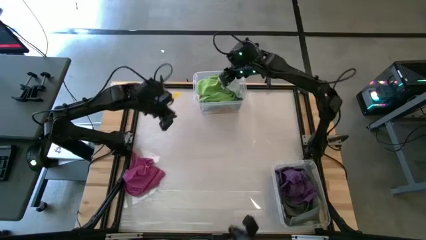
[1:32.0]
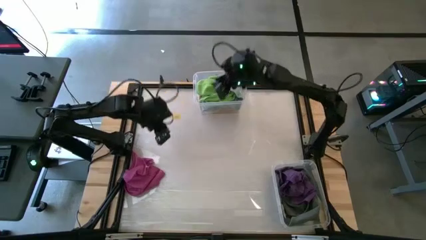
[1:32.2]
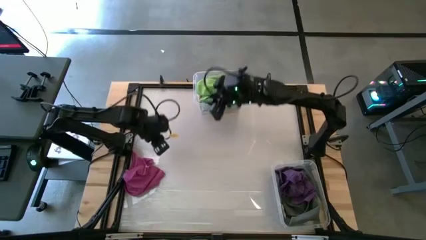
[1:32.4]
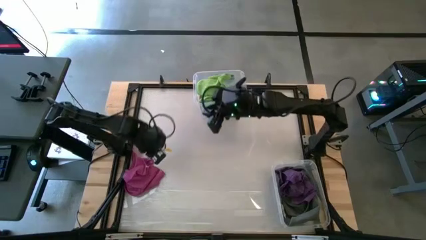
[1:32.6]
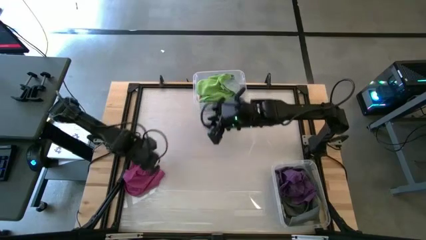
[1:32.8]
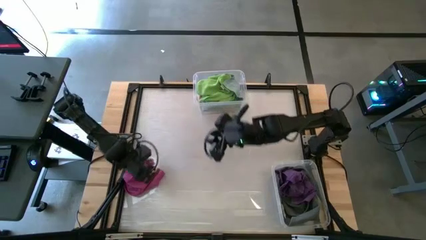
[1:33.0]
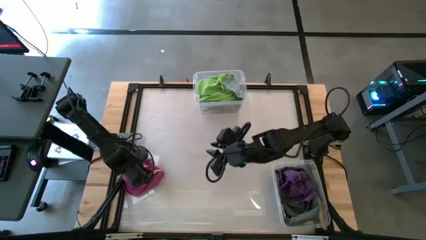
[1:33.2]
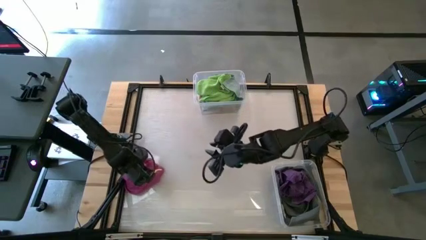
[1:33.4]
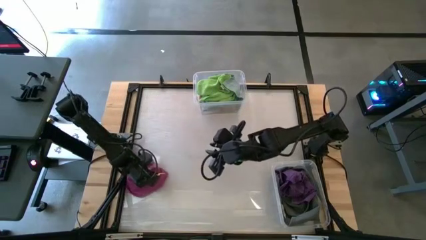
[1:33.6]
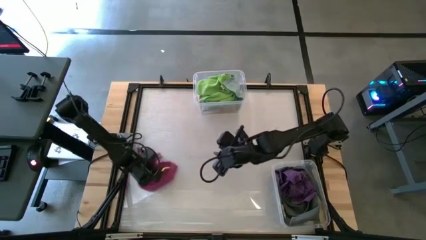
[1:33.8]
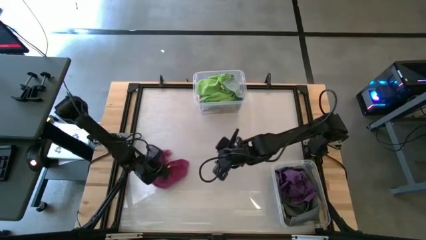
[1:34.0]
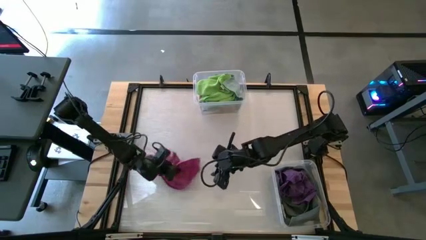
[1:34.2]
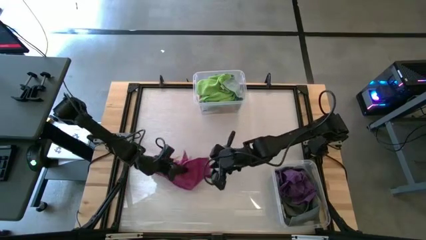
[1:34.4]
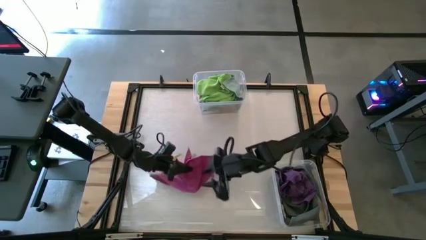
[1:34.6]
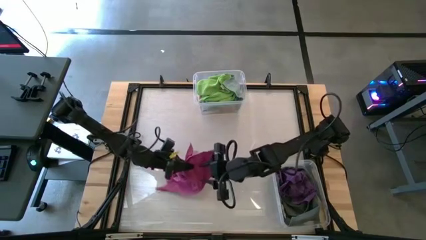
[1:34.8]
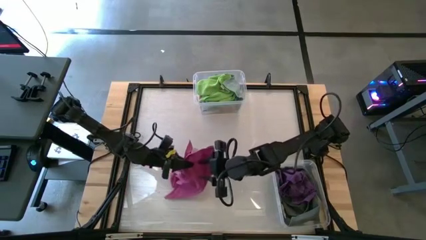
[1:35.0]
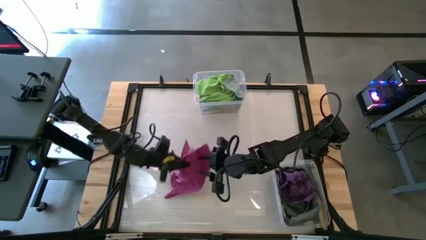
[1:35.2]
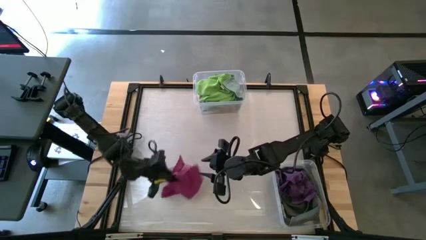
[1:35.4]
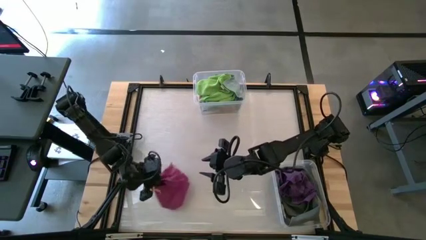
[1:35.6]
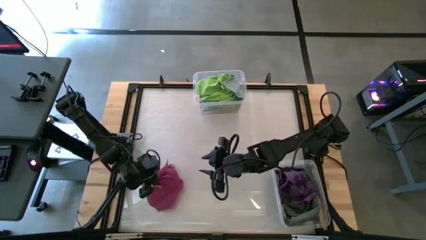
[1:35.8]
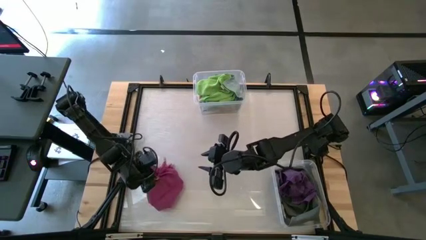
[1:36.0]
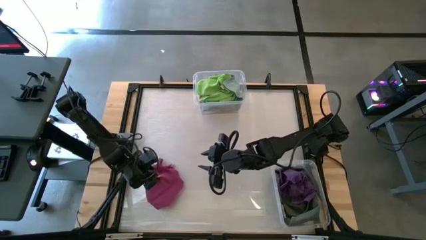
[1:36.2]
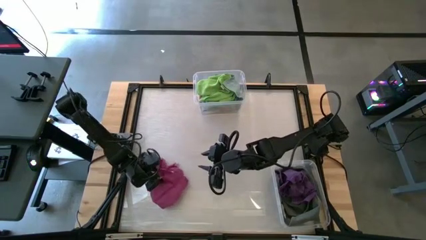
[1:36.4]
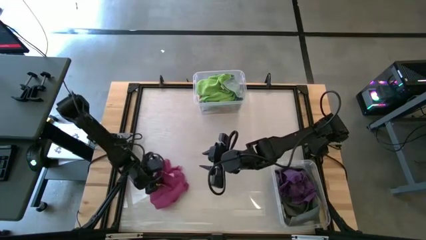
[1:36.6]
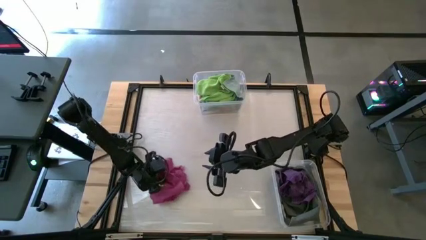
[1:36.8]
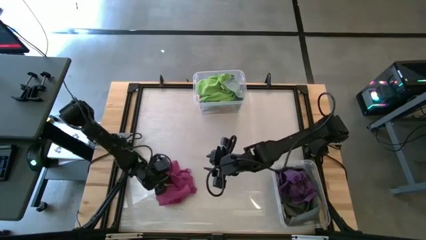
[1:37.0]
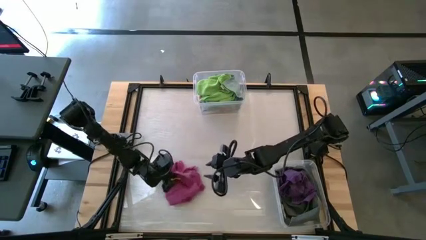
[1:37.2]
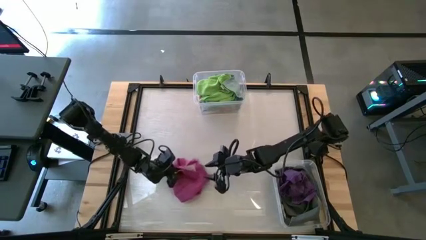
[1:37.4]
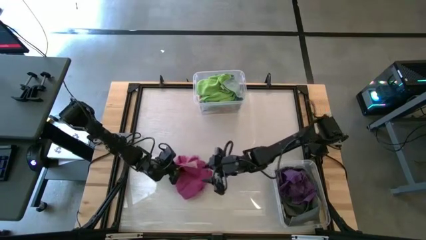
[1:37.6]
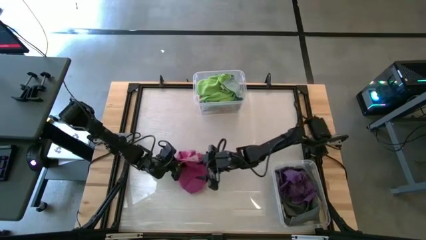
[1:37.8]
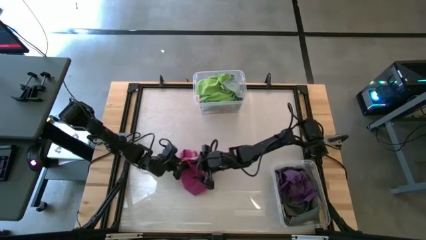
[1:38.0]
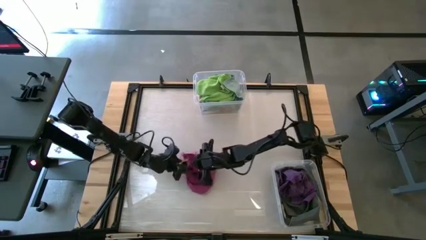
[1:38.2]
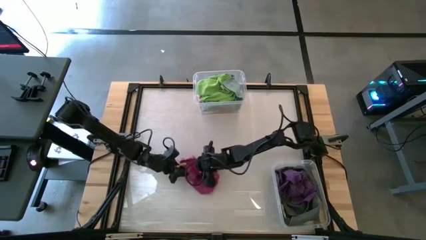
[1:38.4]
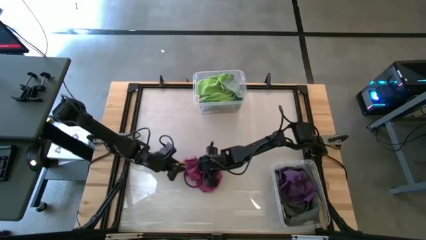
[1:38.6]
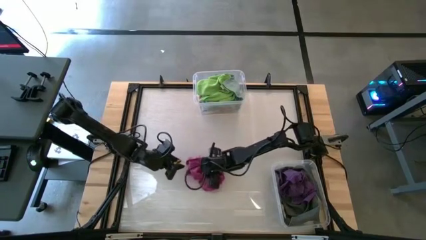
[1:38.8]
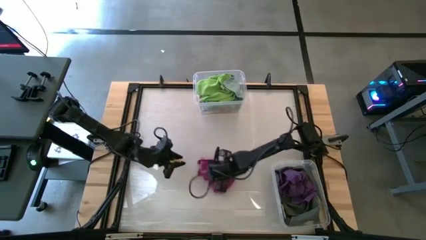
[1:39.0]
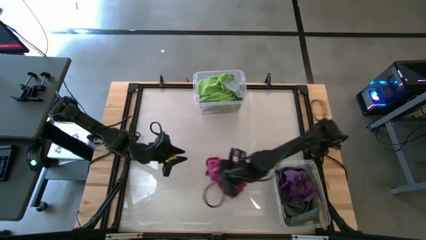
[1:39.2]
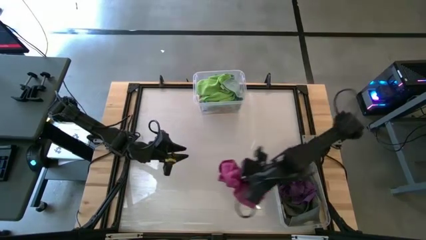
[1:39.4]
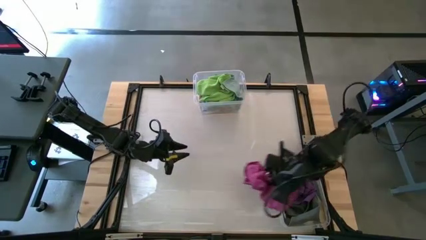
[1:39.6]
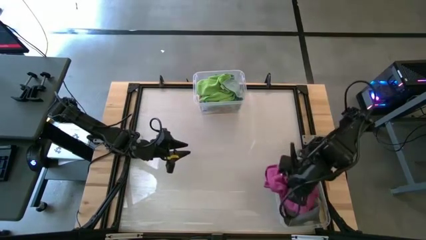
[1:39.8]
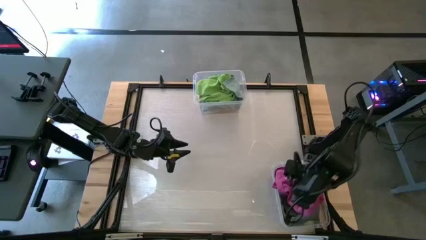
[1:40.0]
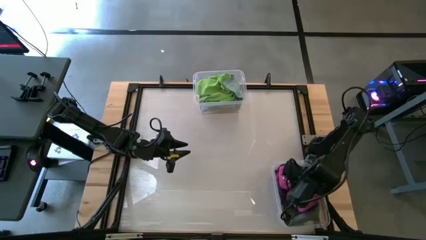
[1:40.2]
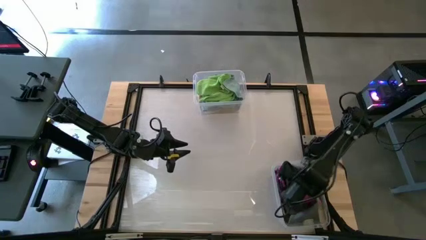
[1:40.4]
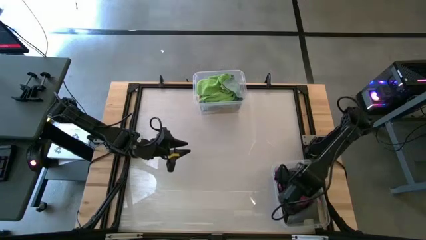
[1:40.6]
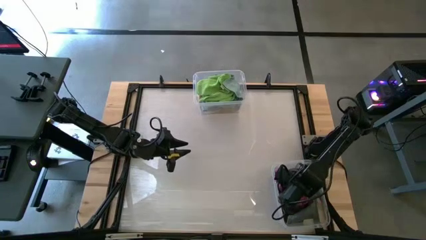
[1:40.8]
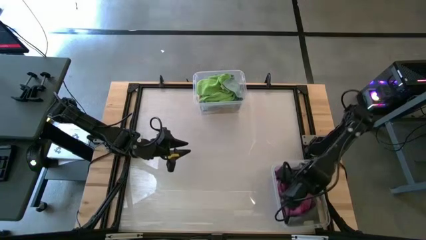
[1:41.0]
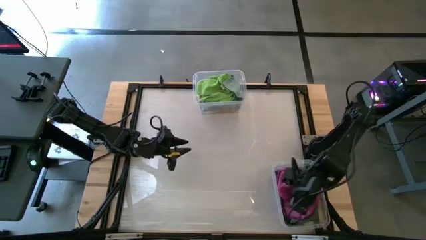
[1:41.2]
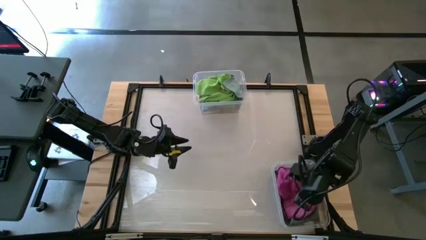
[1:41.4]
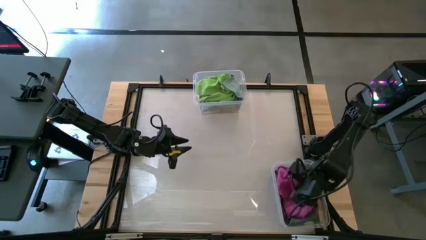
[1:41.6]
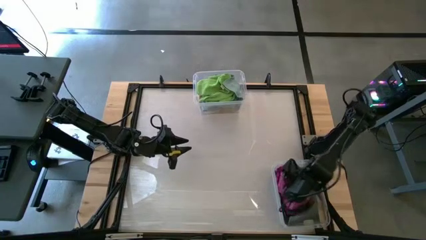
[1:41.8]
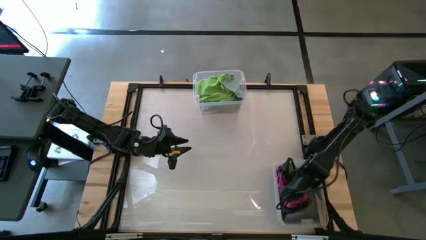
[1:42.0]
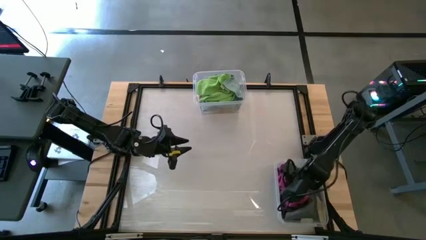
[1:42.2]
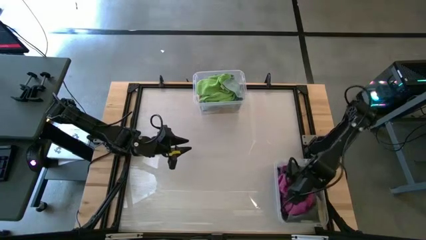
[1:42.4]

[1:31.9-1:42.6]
Task: Sort towels by color in basket
Put the pink towel into the bottom transparent bin

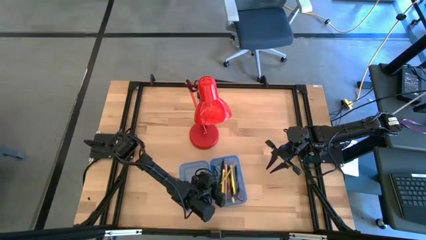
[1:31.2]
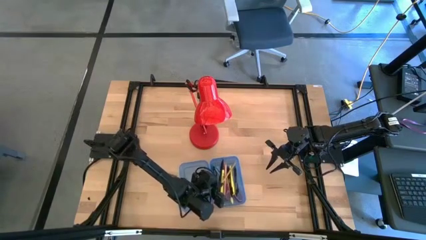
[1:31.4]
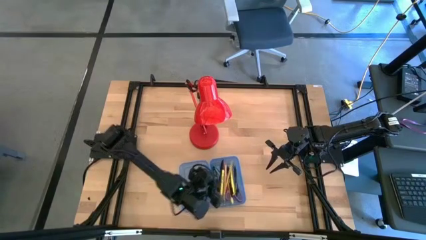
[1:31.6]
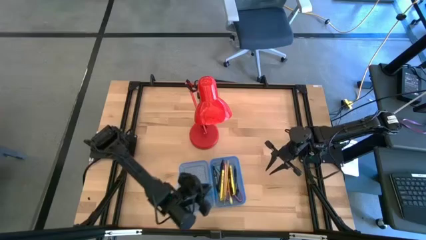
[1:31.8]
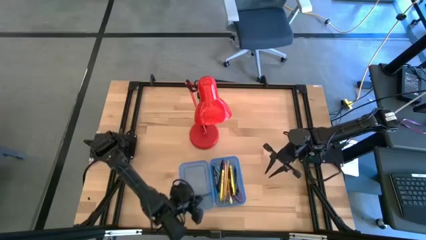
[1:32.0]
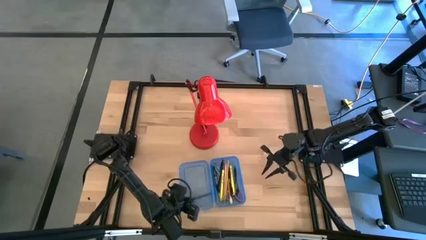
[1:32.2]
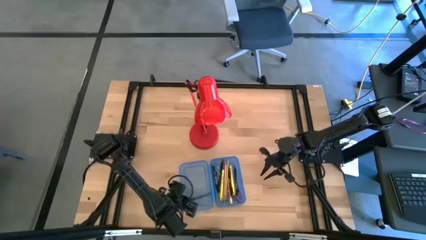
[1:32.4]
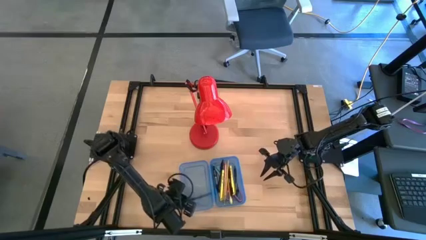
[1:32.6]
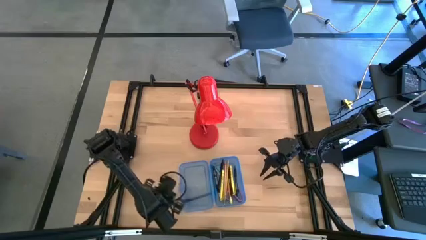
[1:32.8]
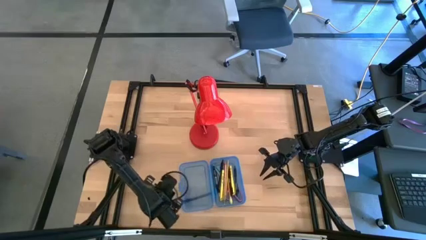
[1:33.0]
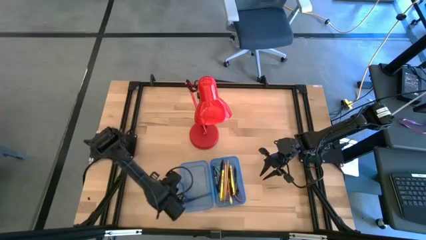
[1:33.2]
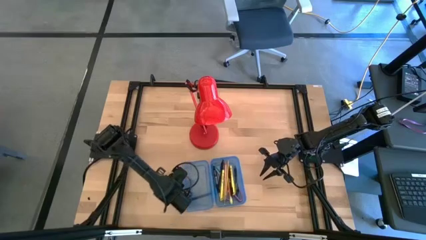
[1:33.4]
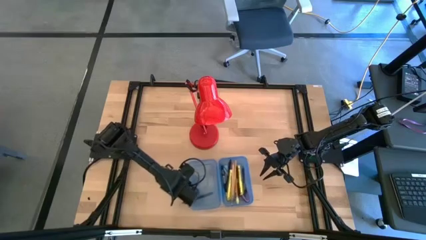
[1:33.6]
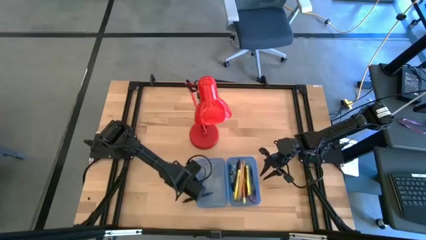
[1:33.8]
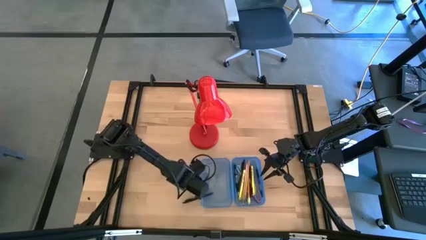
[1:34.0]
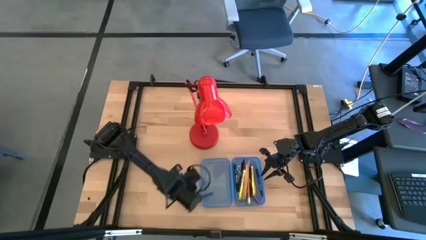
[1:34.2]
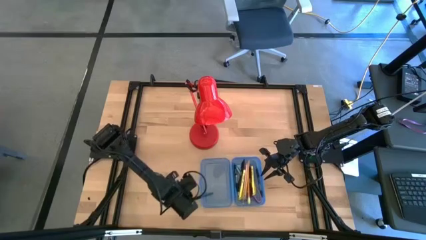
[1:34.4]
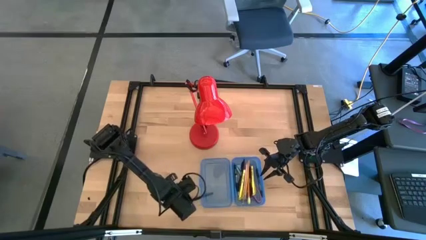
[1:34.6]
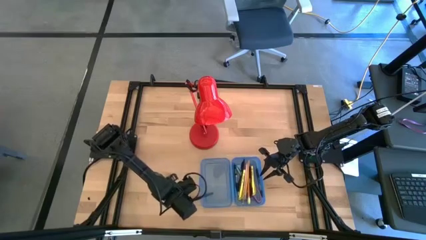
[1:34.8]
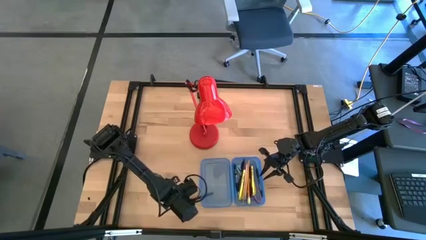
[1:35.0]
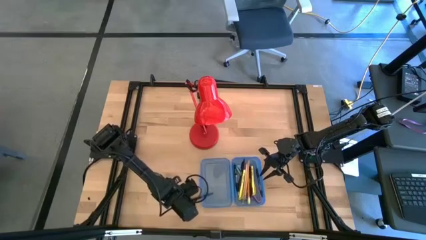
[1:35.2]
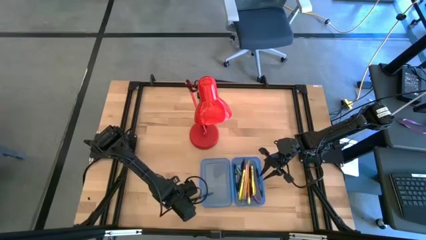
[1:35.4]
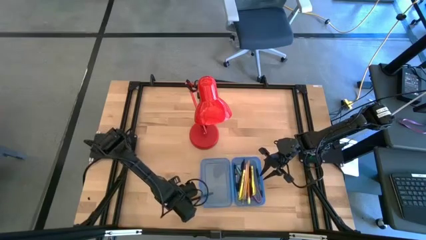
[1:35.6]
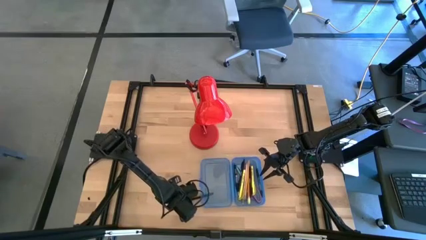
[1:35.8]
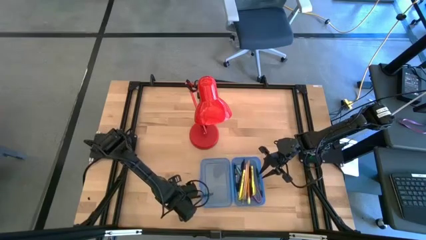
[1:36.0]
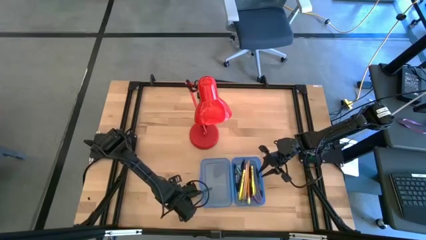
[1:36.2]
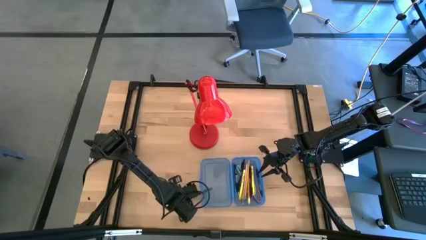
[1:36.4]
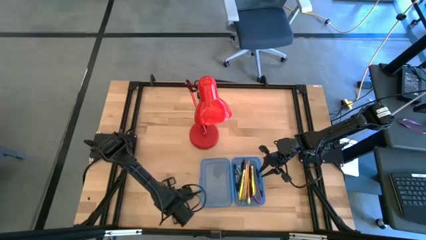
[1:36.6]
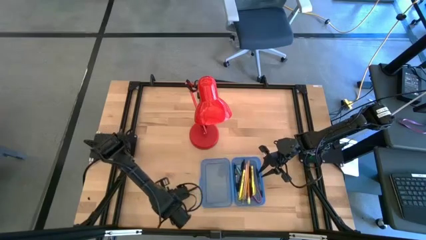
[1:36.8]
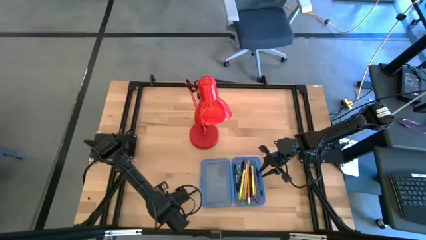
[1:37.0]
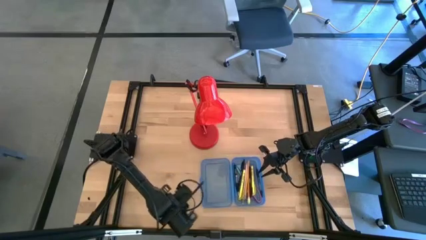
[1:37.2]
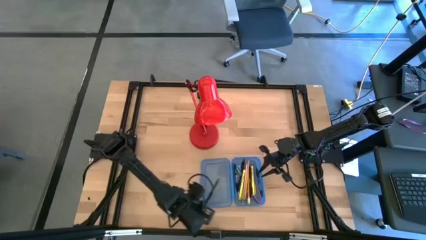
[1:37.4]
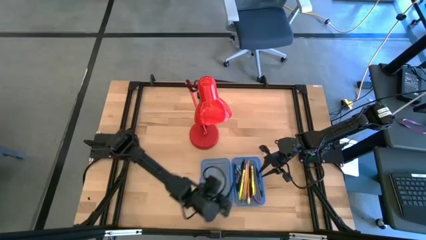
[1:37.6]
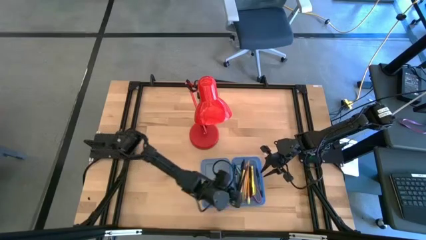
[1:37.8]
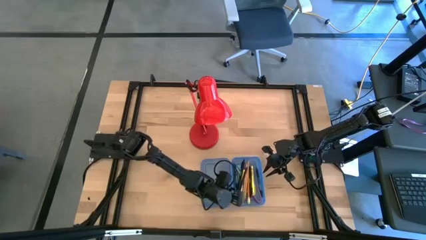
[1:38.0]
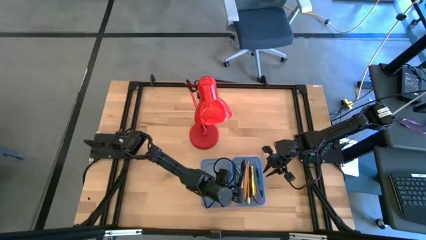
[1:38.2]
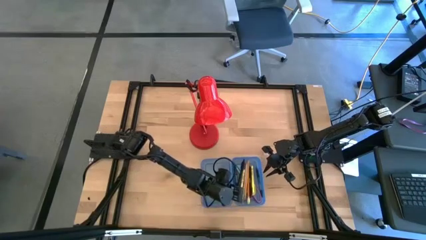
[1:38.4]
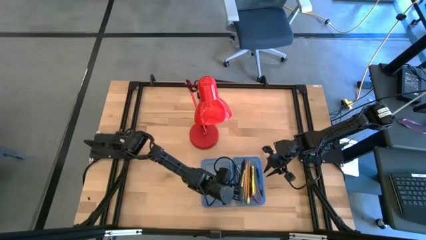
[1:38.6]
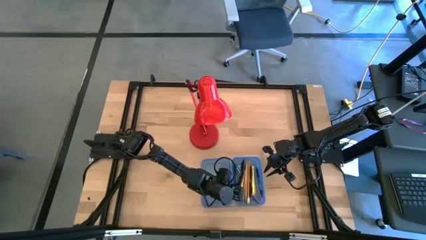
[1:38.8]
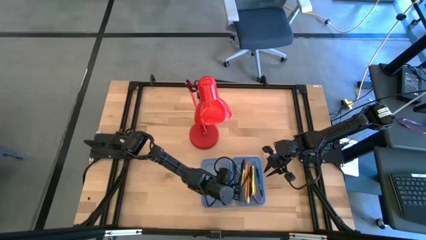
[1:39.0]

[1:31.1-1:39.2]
Task: Pick & place school supplies into a supply box
Put the black pen into the blue supply box
